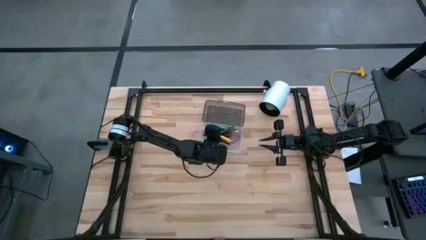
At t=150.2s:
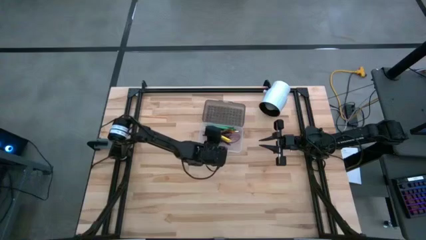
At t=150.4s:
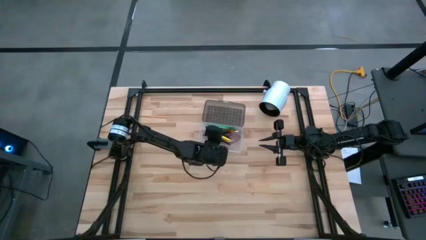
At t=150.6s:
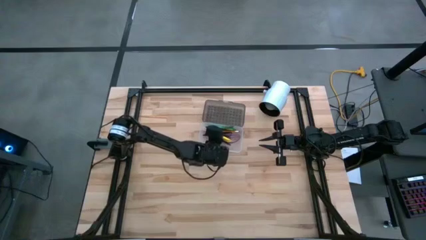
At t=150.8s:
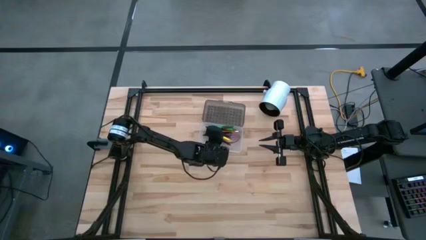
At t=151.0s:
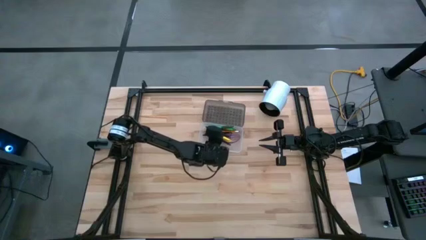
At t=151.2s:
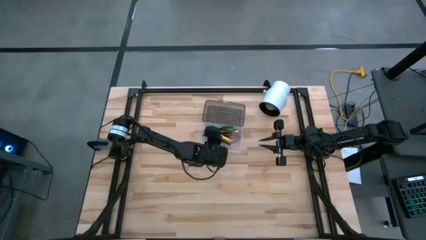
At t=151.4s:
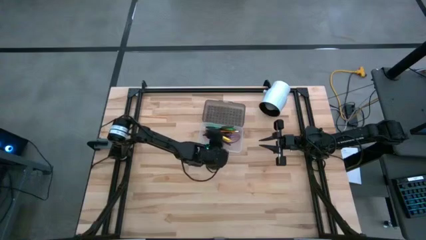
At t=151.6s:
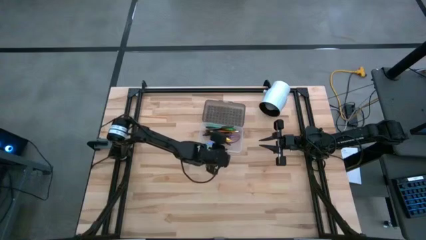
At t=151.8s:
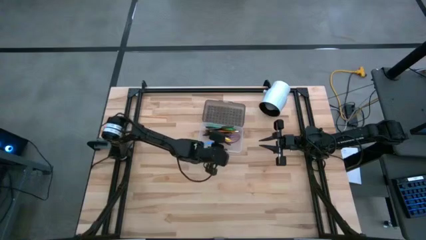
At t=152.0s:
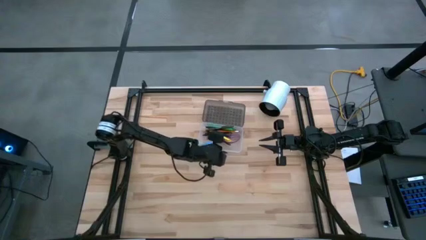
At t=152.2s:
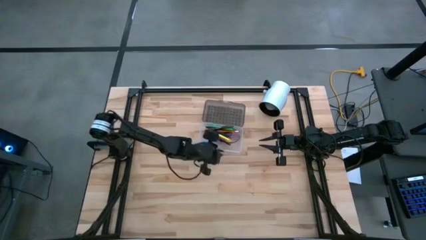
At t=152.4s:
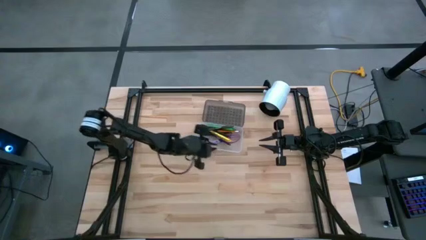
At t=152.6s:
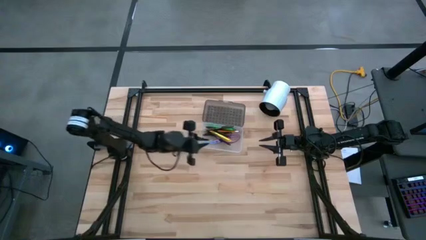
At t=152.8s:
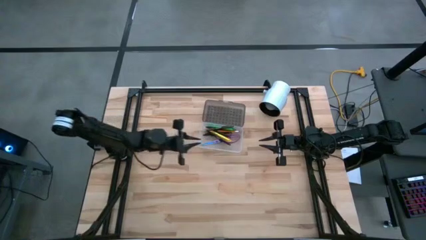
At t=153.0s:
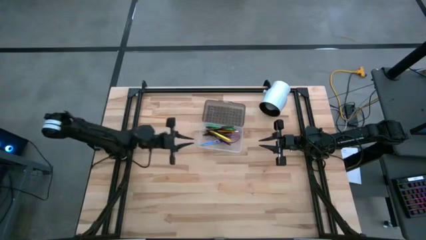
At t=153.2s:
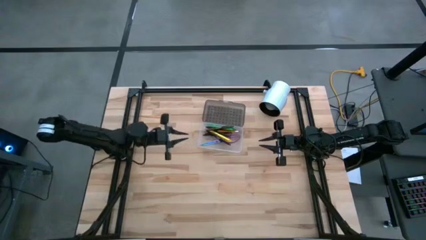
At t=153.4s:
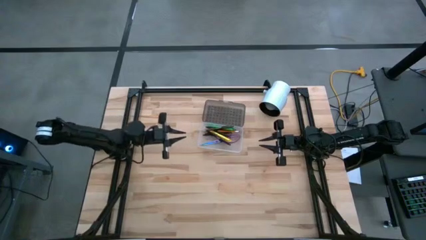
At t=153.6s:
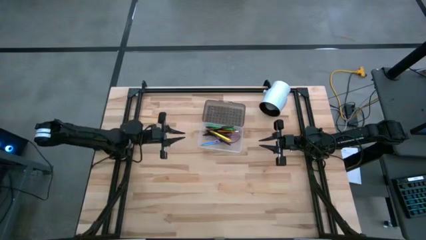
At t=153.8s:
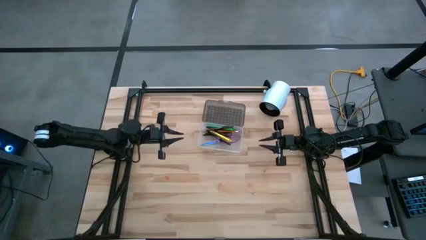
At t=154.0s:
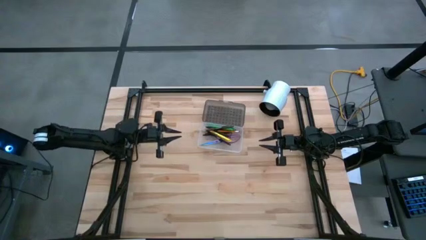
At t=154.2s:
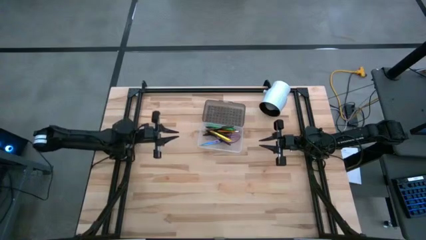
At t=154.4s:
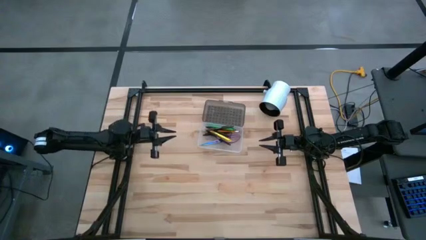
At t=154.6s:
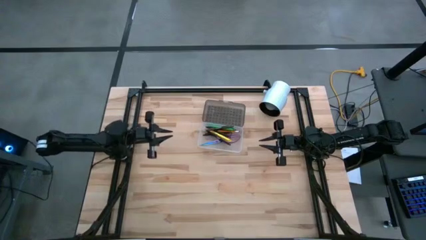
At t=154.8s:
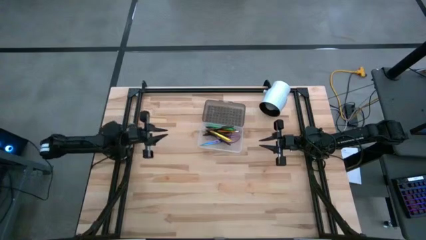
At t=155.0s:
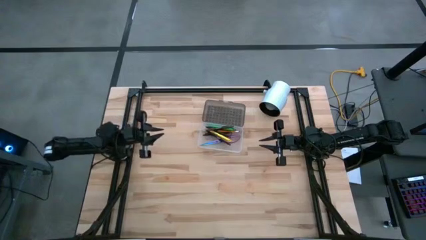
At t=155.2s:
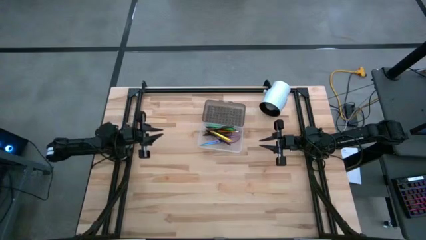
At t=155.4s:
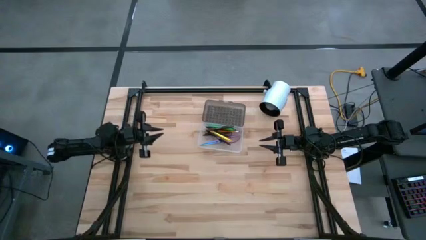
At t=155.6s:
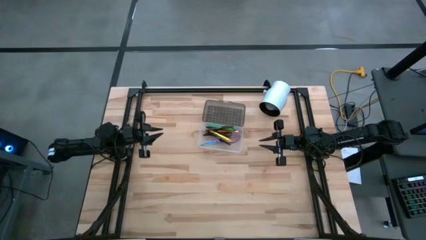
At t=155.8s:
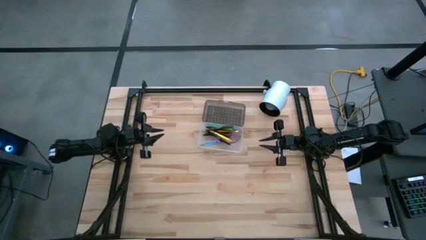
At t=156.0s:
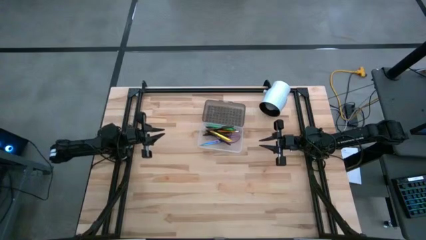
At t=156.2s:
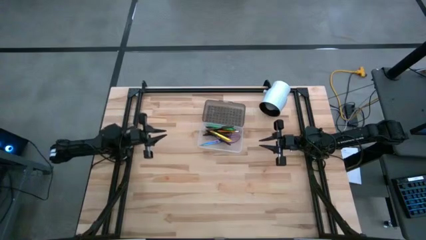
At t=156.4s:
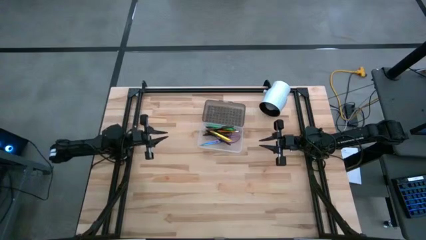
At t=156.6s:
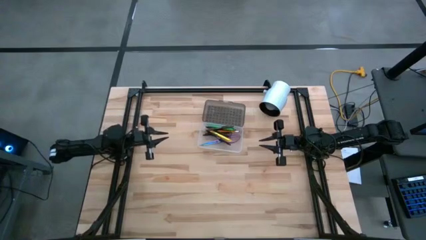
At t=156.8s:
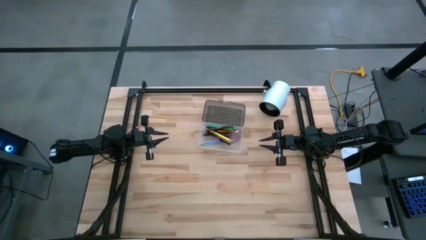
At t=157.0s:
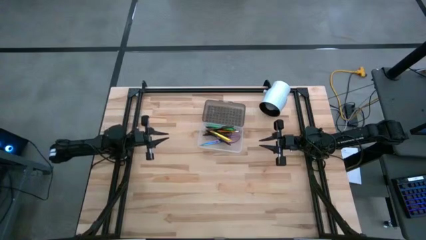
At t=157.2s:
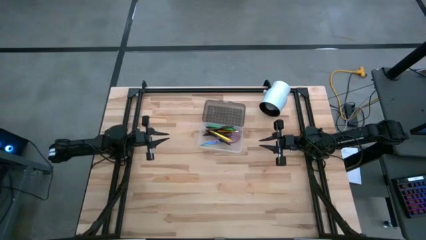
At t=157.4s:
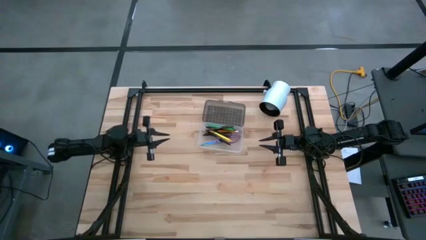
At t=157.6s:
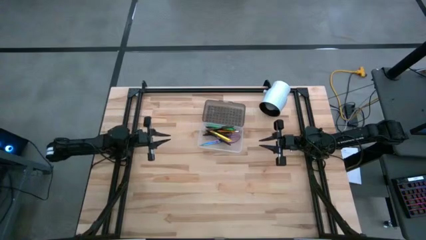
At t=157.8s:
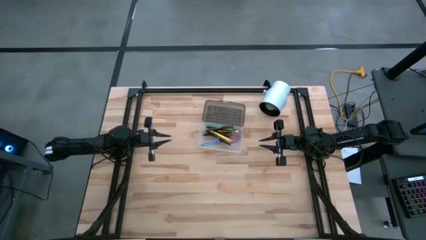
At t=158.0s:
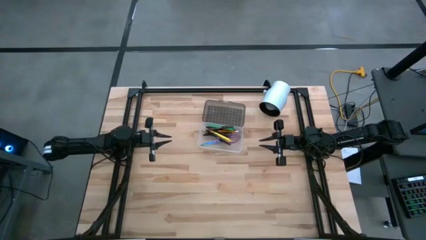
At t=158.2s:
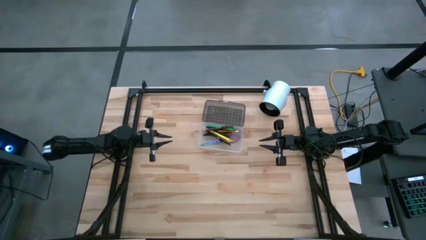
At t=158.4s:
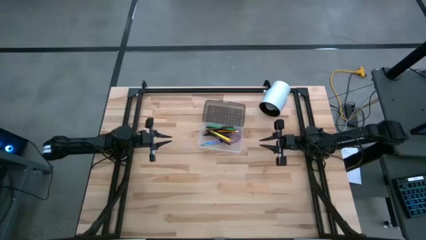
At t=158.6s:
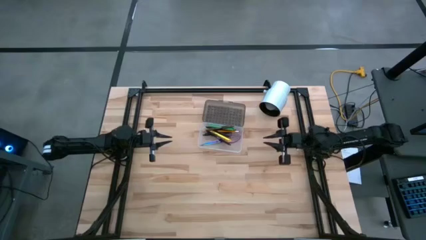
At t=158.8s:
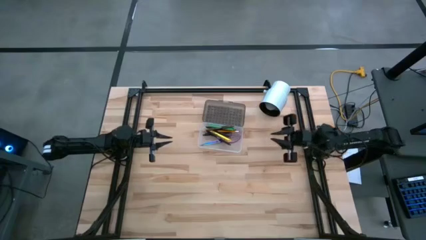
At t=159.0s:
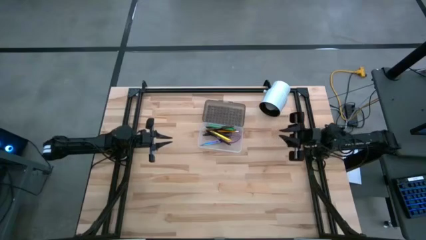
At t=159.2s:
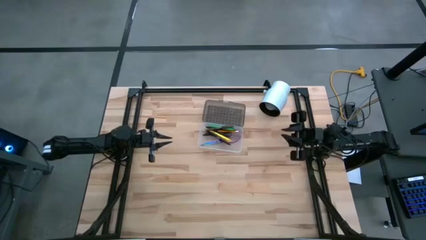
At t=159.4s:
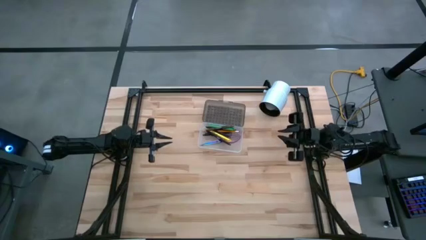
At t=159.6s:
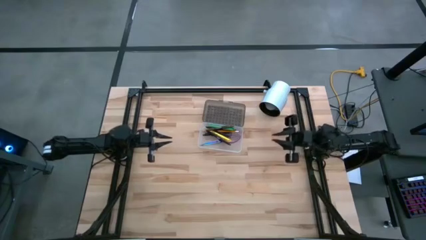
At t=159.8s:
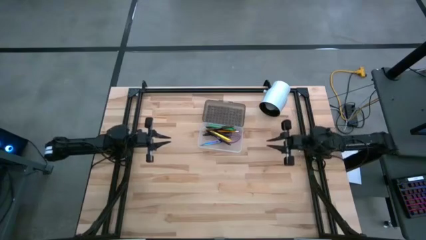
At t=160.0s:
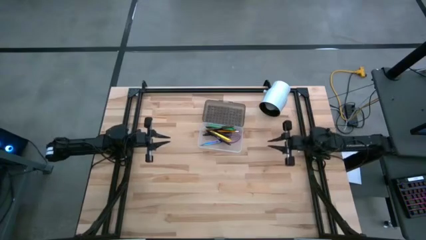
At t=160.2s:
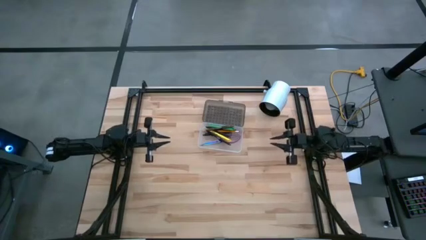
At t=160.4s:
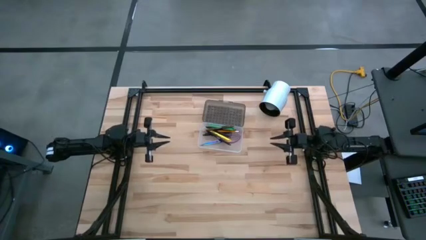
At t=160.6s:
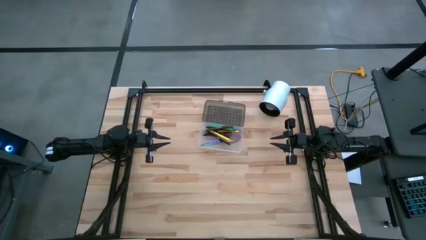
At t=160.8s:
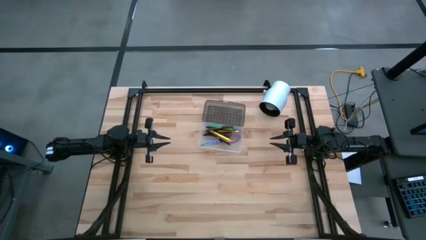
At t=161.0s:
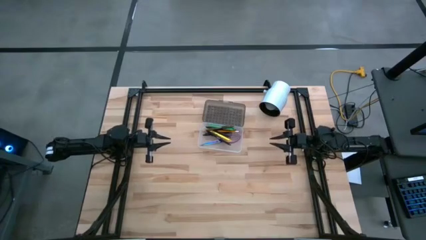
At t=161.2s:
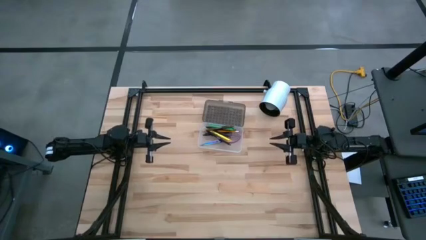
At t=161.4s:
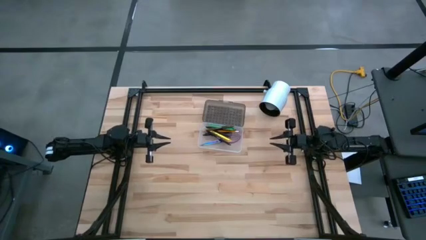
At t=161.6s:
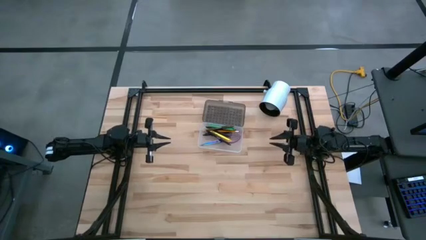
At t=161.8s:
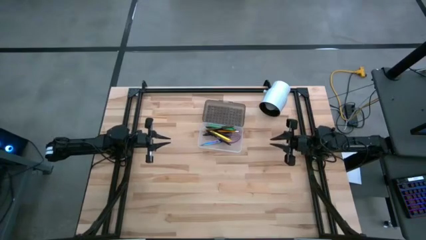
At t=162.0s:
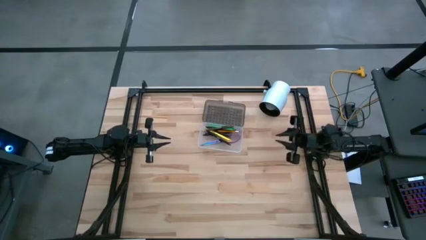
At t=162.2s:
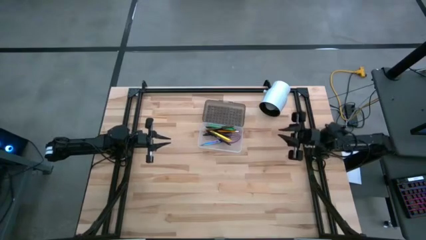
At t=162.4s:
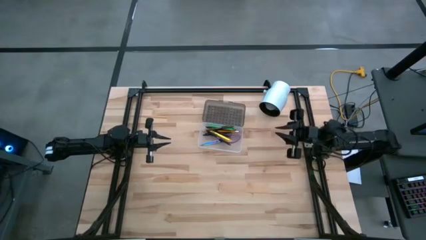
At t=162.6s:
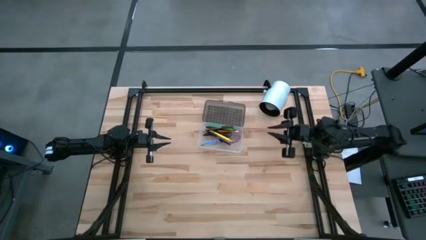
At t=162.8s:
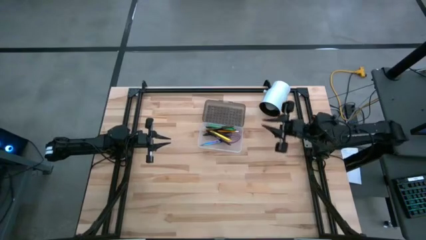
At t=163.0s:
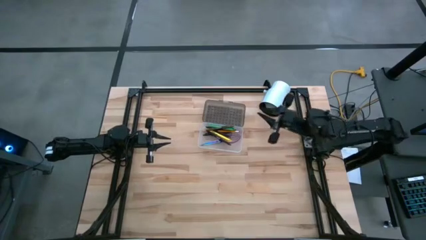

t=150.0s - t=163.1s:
Task: Pick & place school supplies into a supply box
Close the supply box
